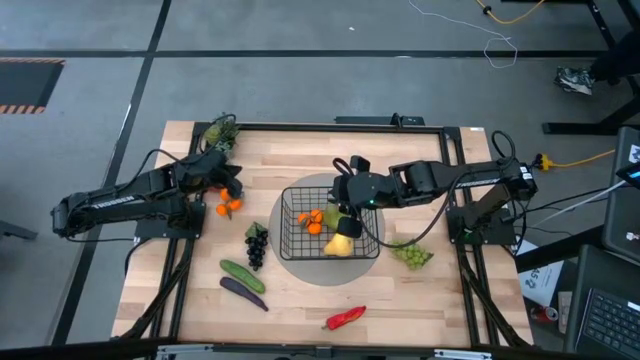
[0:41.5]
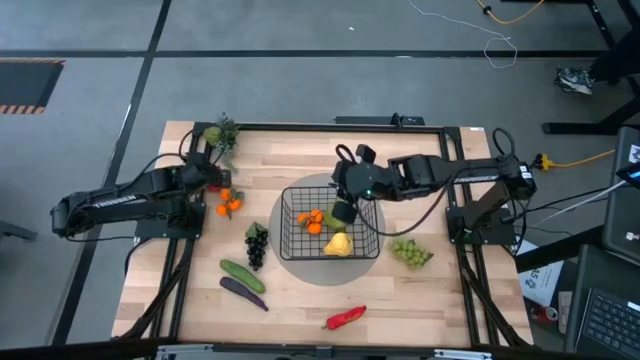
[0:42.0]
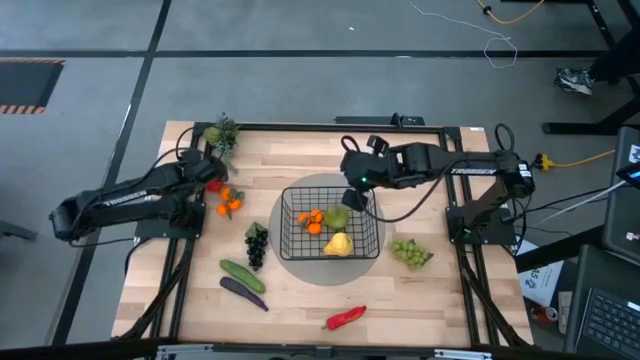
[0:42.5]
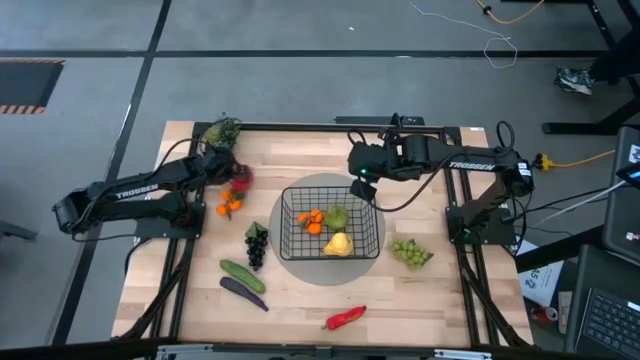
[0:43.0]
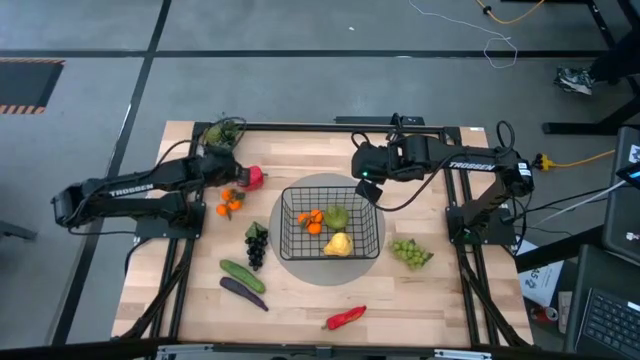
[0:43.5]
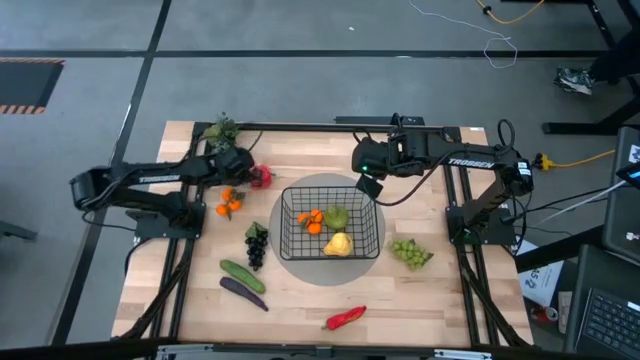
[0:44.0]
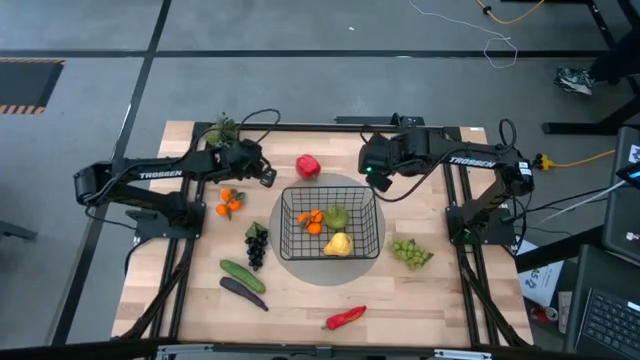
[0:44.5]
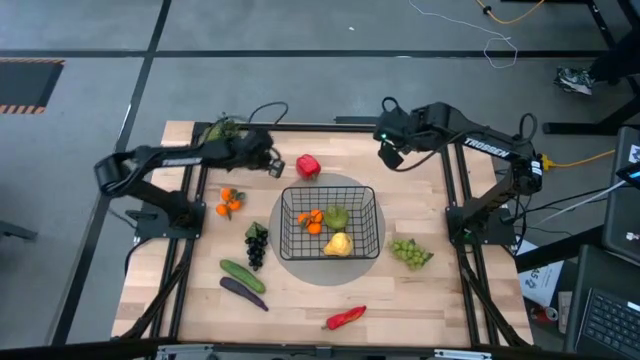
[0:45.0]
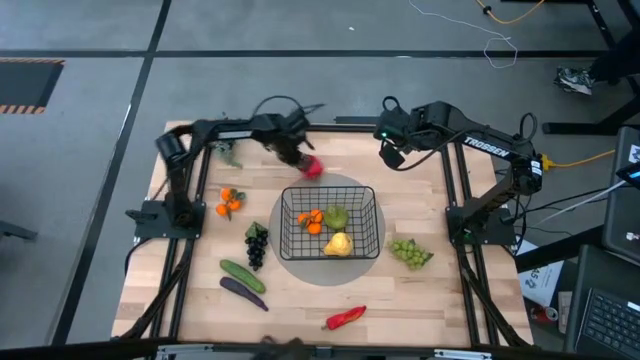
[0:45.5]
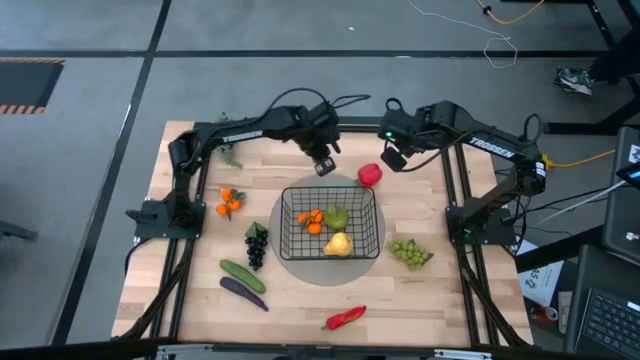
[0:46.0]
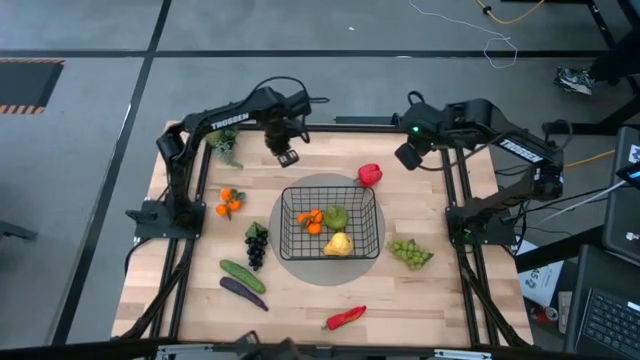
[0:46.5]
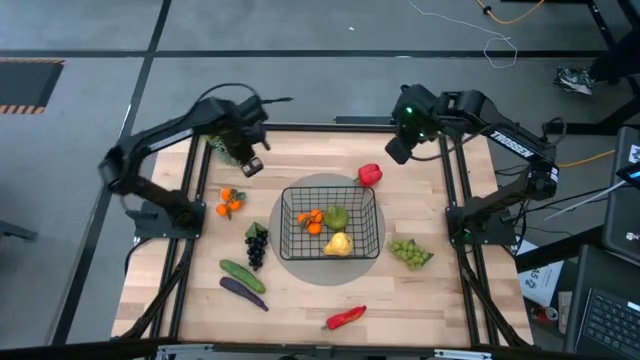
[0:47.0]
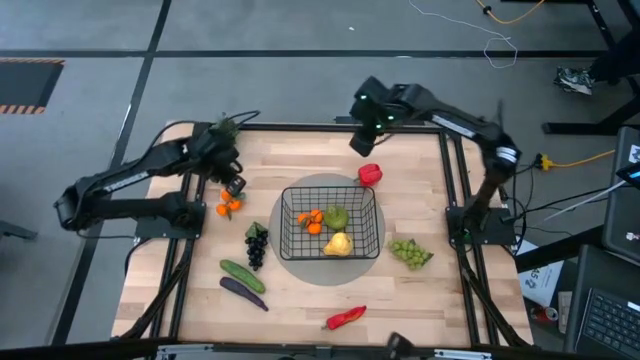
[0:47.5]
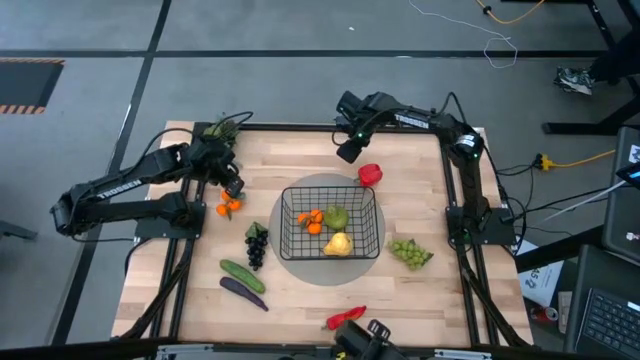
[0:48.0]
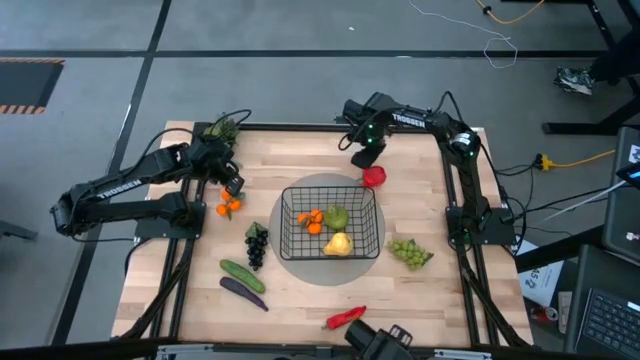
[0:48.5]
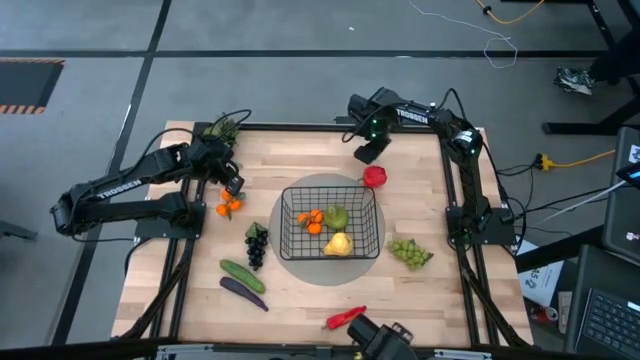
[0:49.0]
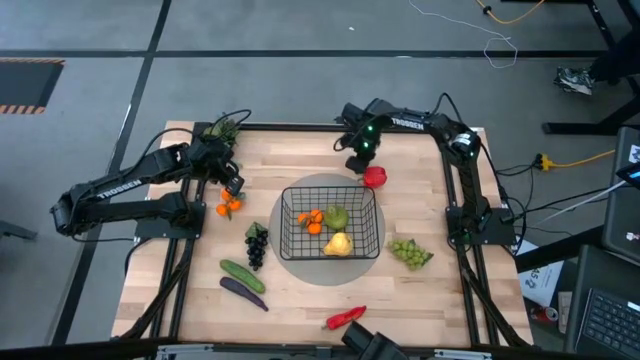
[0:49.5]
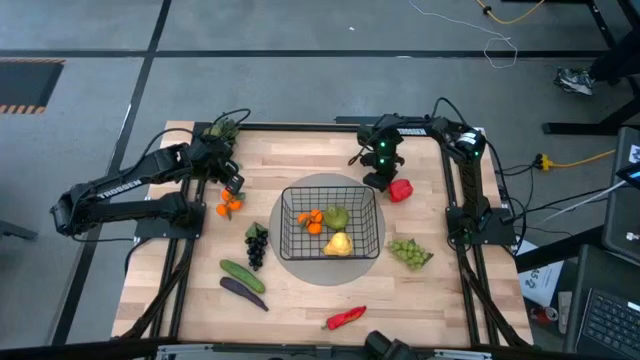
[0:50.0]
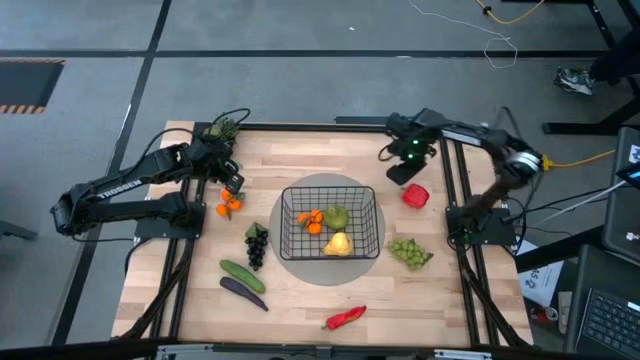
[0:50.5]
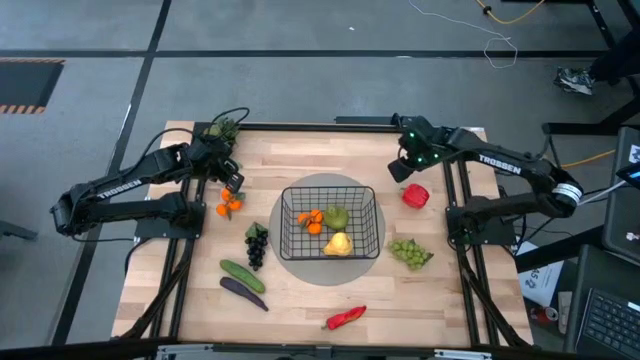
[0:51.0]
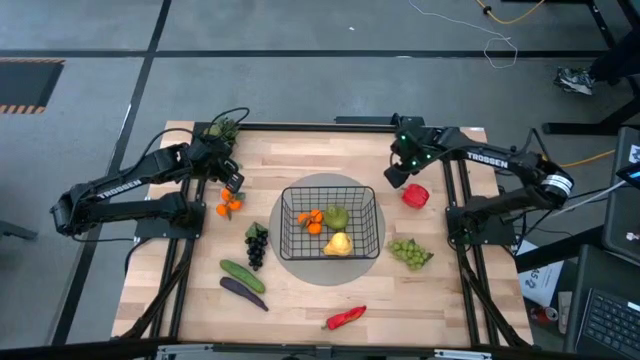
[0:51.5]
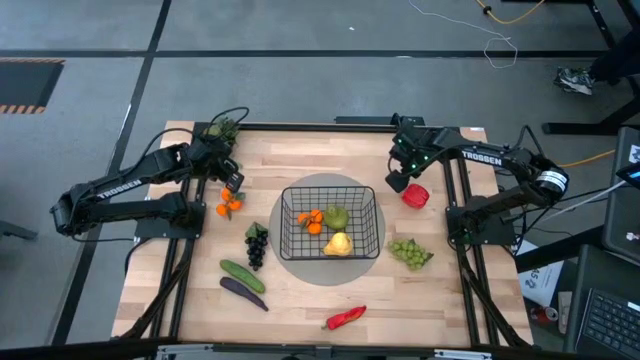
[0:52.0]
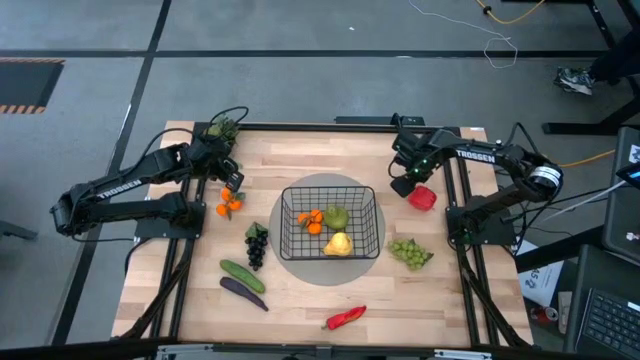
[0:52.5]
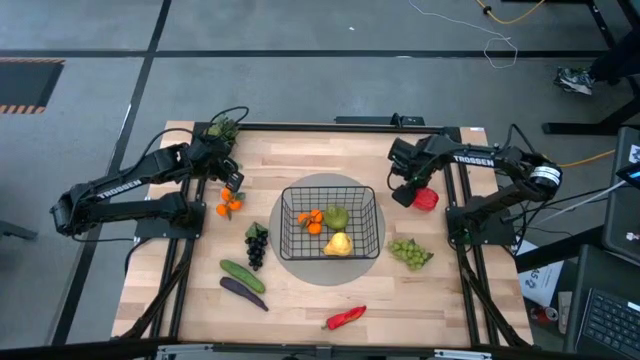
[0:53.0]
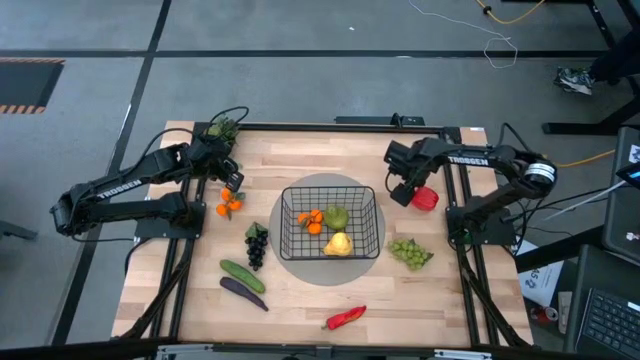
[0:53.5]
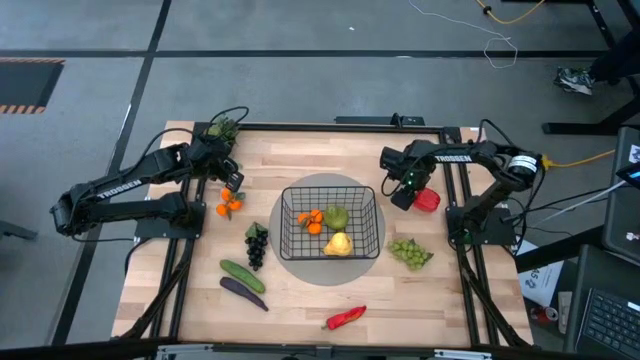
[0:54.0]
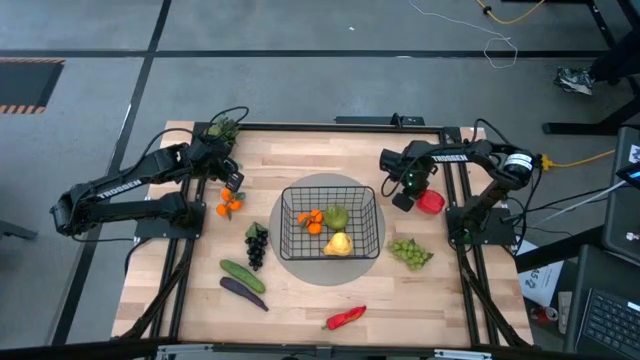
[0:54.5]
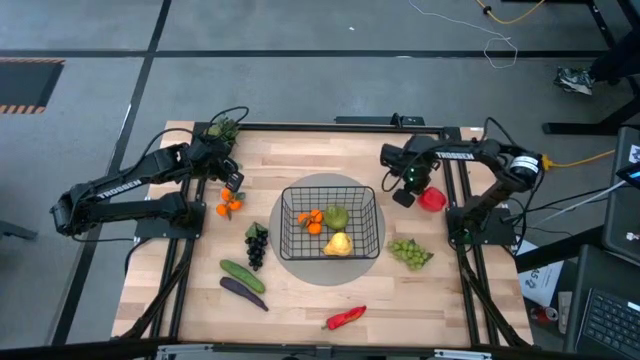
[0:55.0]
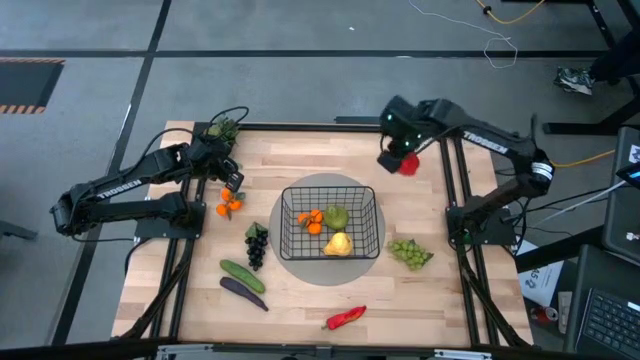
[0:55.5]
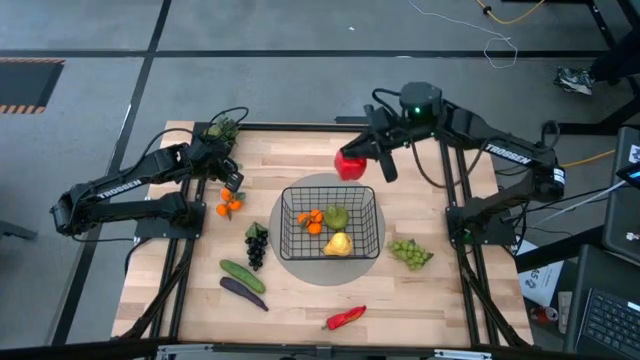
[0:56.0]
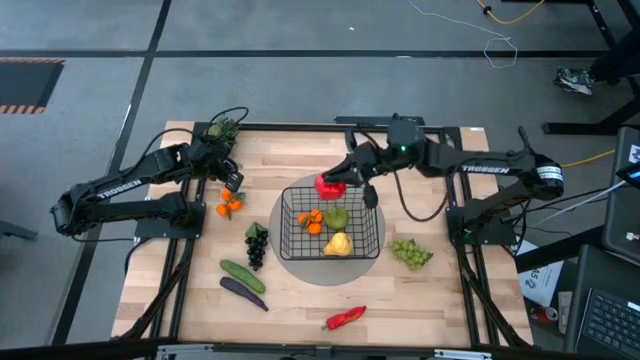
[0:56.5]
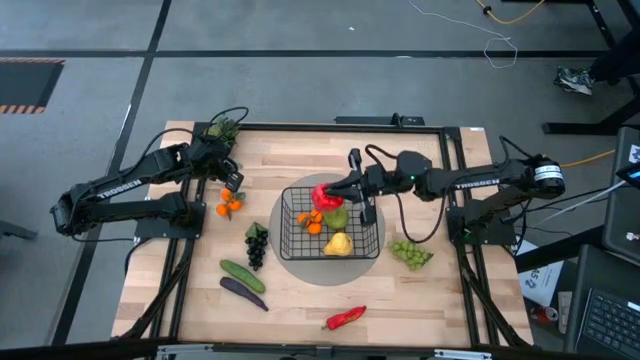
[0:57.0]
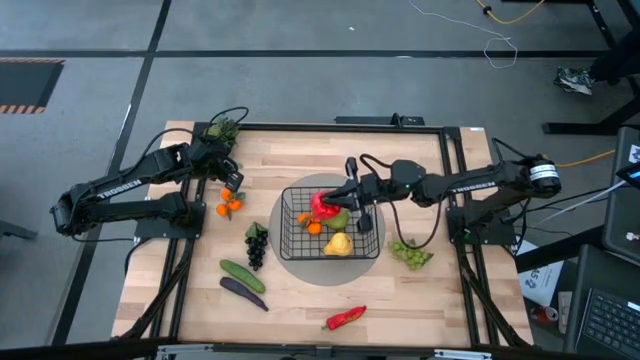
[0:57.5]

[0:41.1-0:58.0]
Task: Build produce basket
Put the bell pepper into the black wire basket

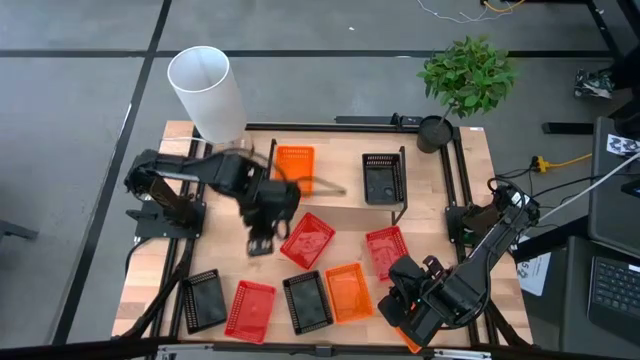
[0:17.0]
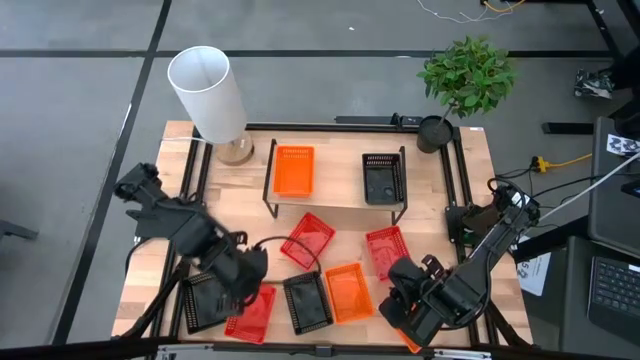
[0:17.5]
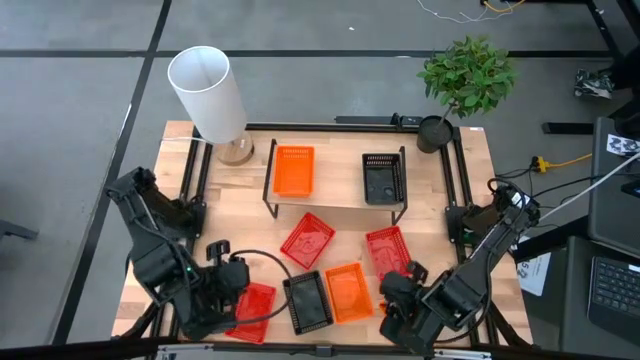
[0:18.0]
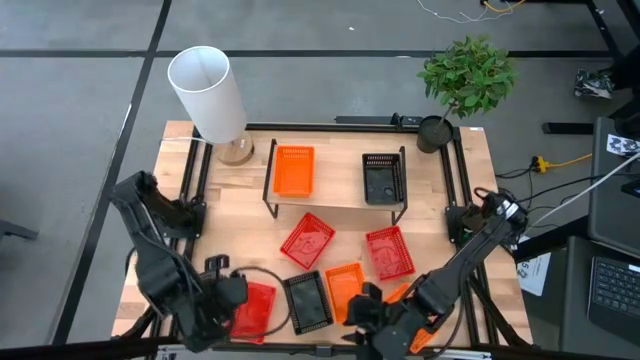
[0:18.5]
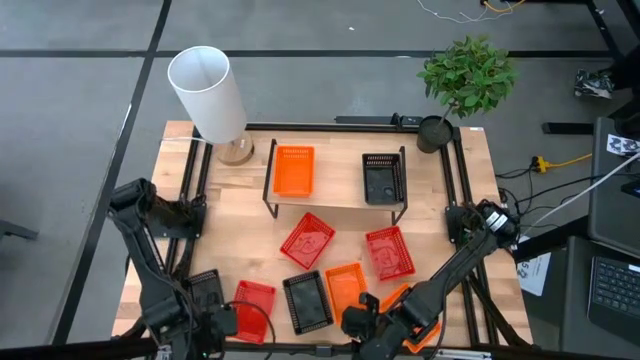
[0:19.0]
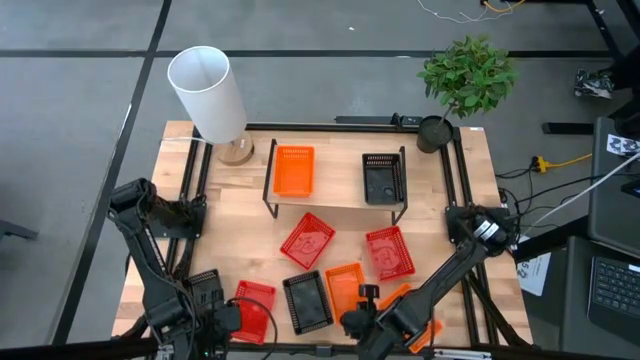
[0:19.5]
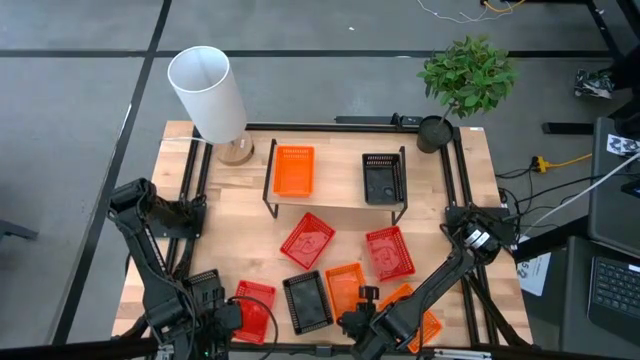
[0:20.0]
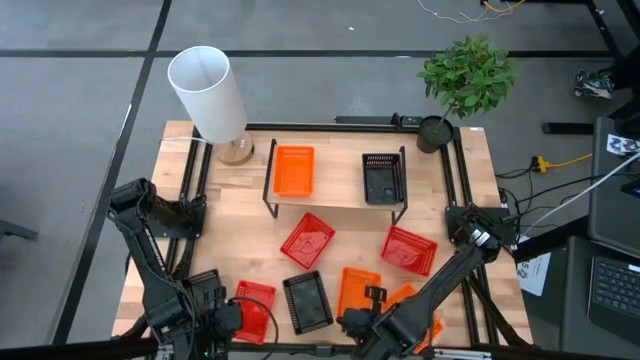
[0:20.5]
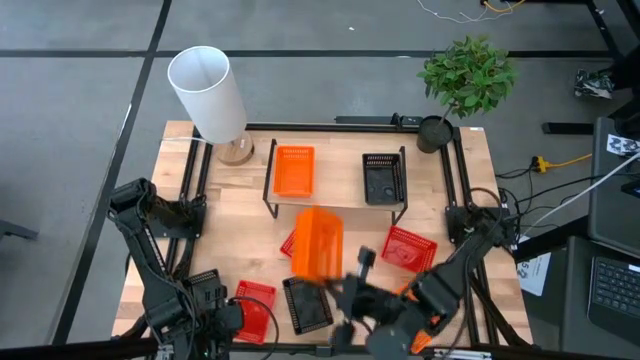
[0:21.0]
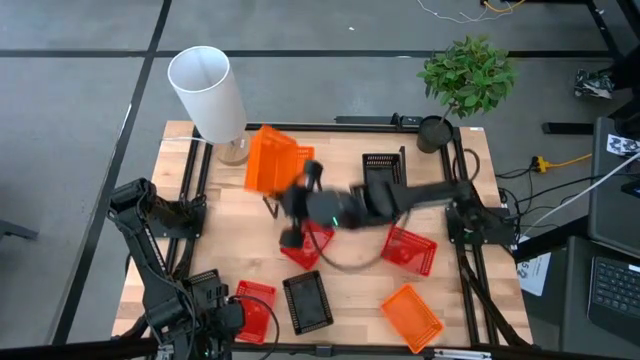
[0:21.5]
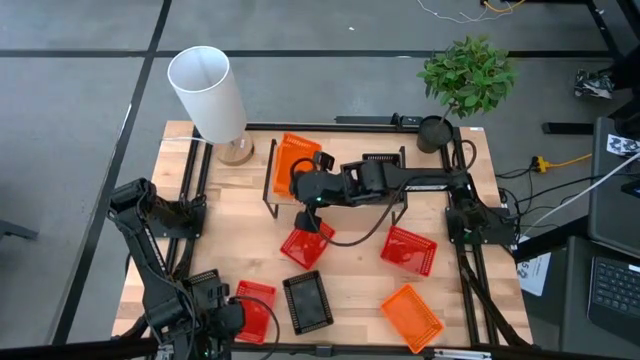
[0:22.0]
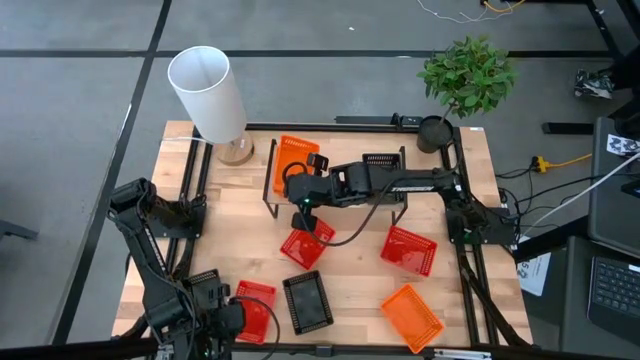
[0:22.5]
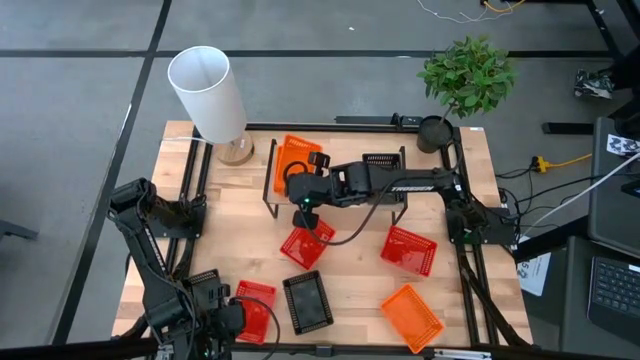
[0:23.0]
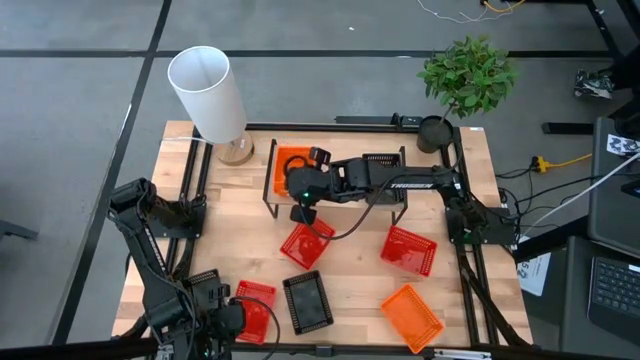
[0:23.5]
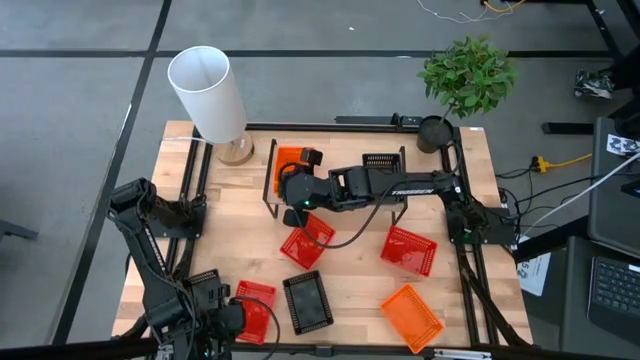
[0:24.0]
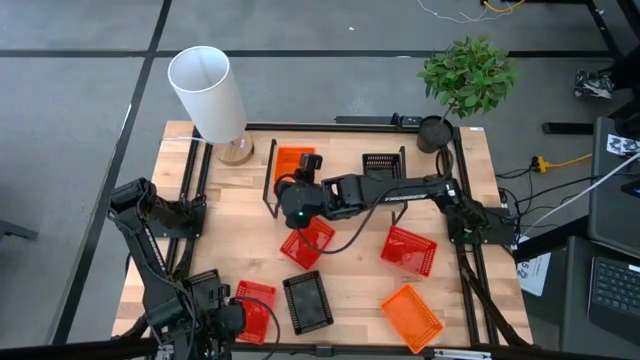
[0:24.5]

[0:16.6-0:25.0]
Task: Stack baskets on shelf by color
Put the left orange bin on top of the other orange bin on the shelf
